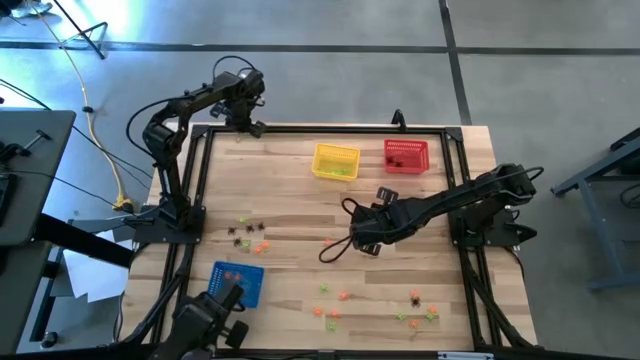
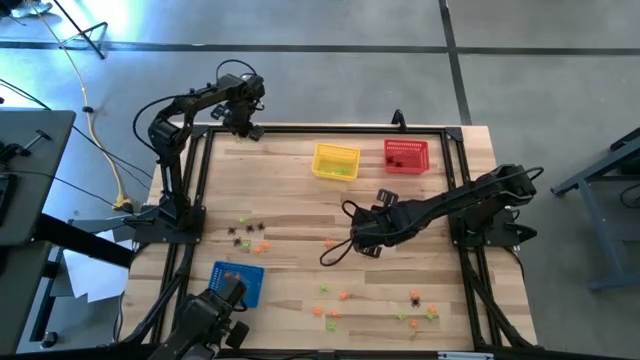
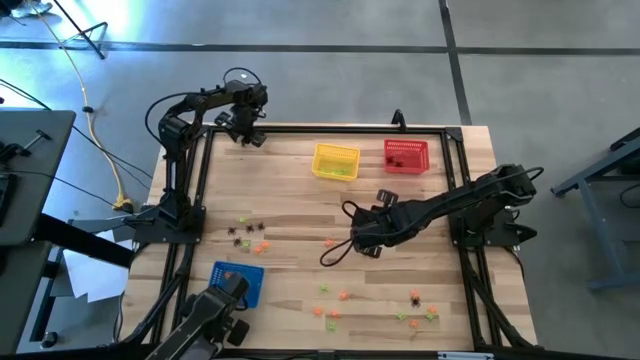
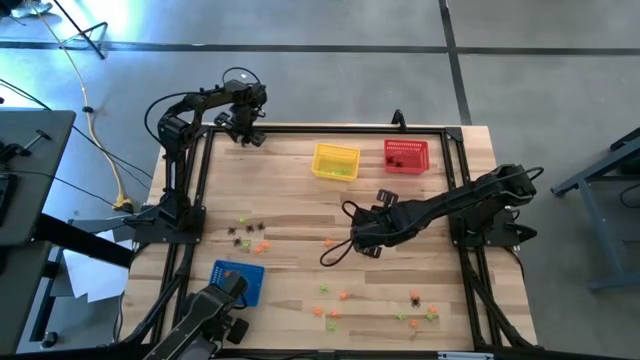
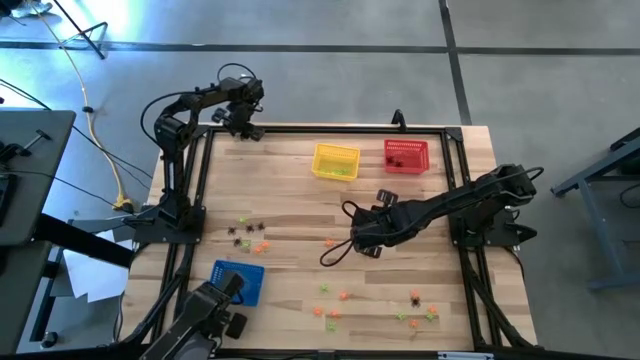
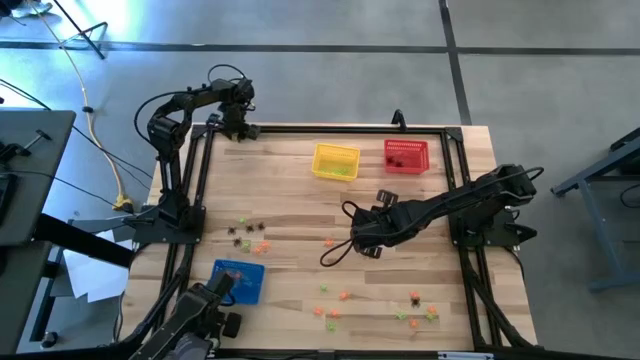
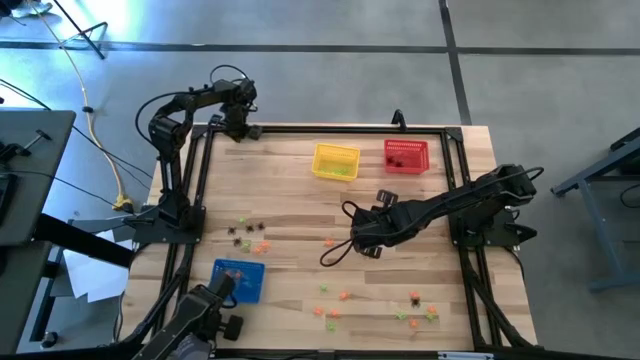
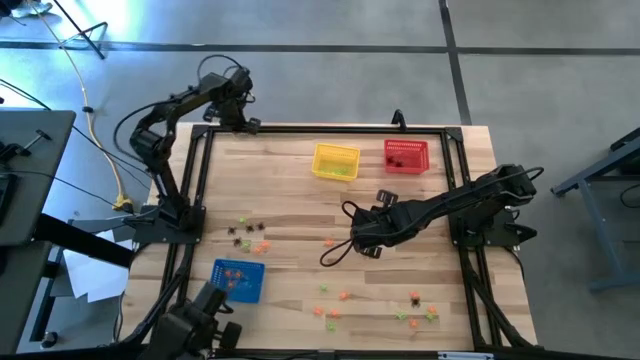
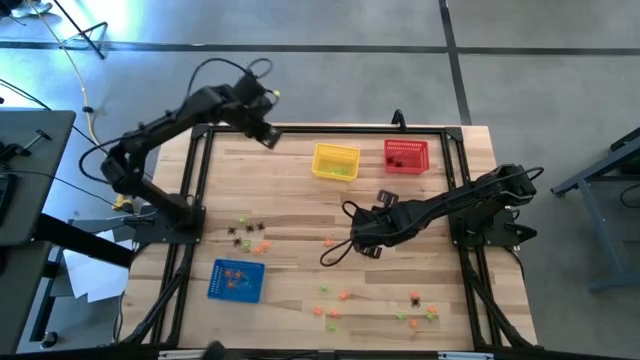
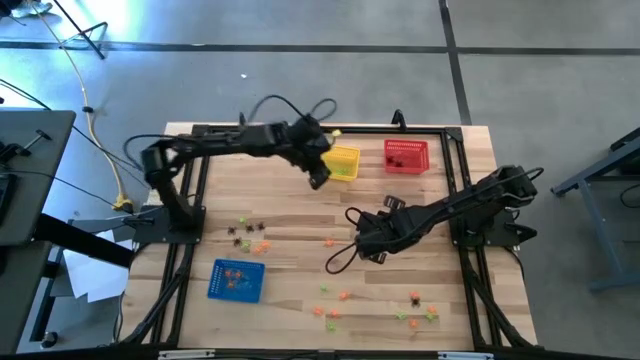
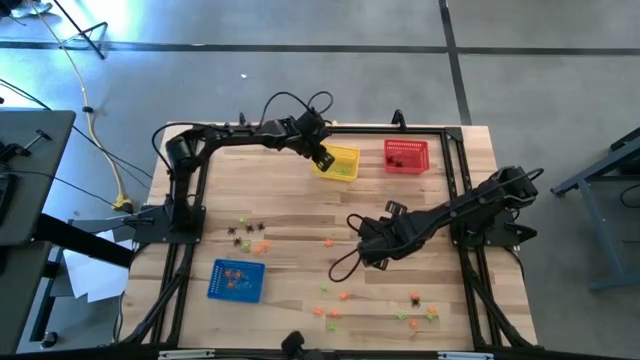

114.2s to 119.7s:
Task: Sort Halloween decoration
Put the green spider toy into the yellow bin

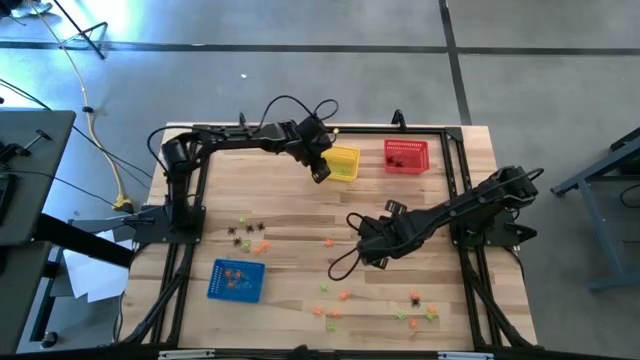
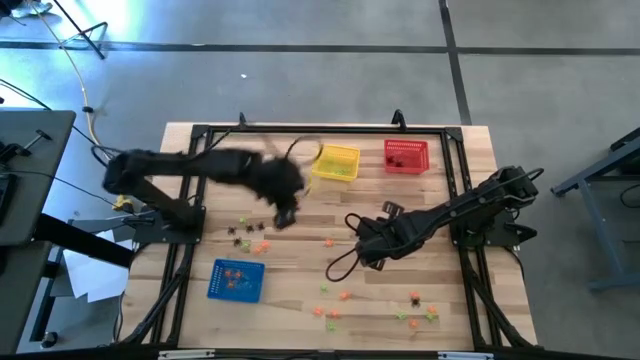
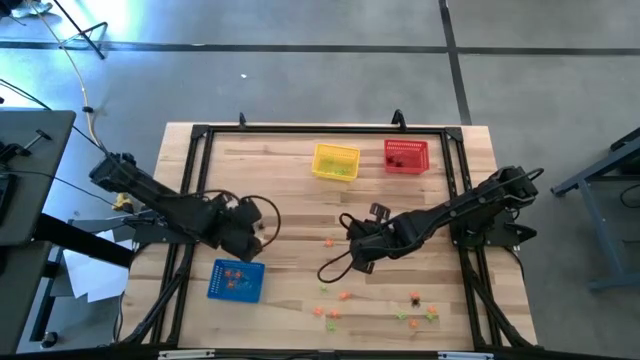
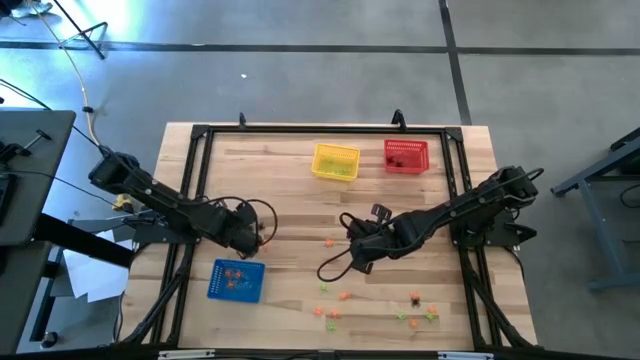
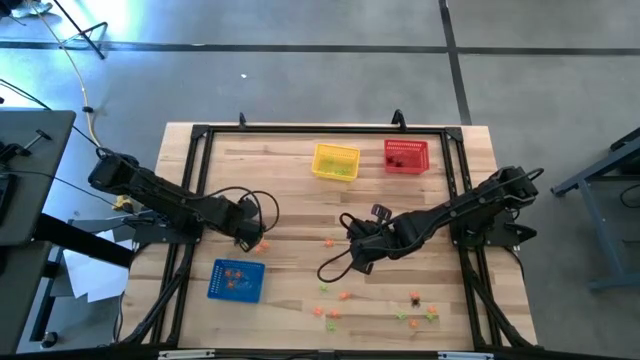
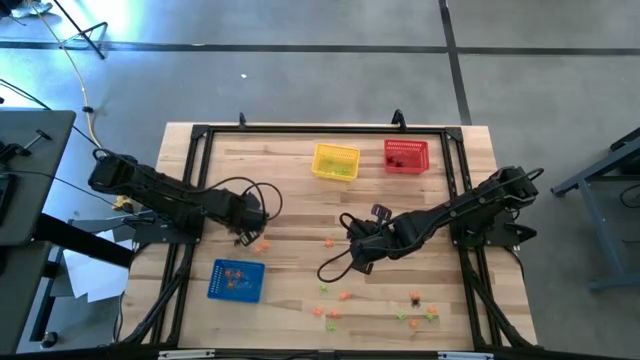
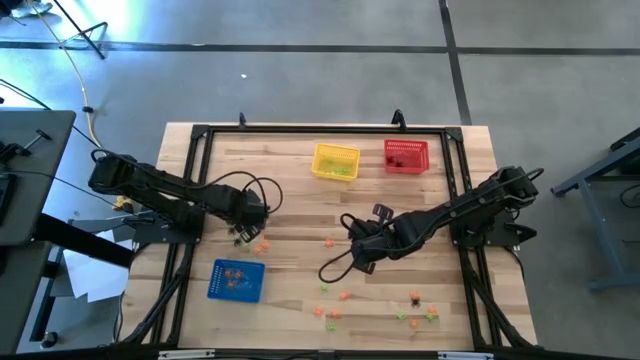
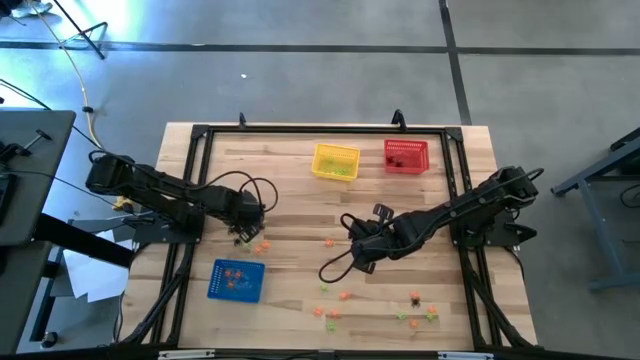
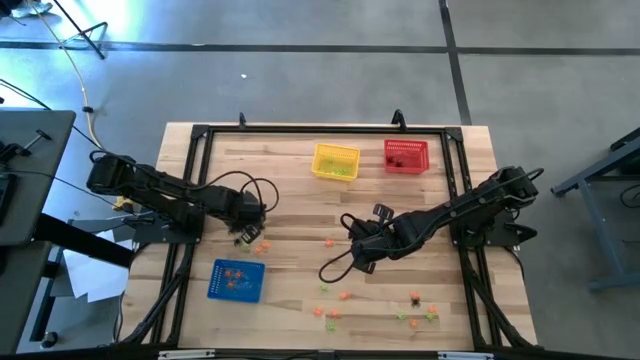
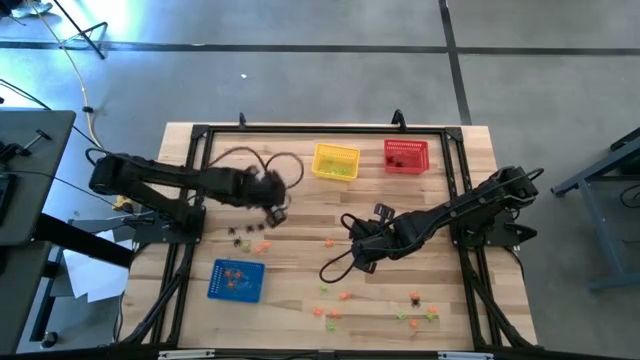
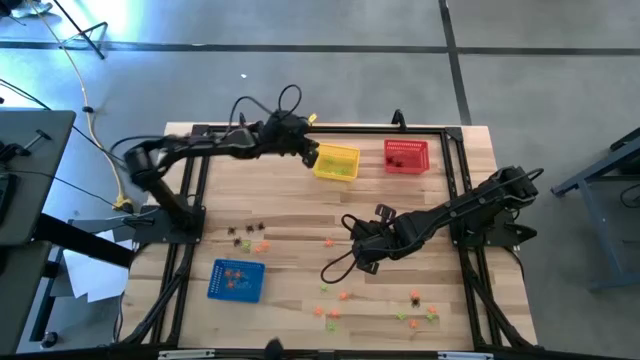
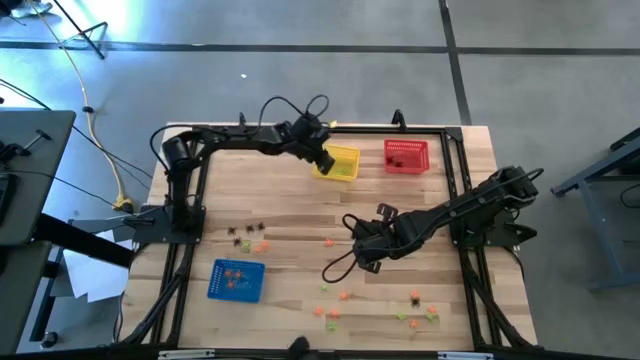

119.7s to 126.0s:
Put the green spider toy into the yellow bin

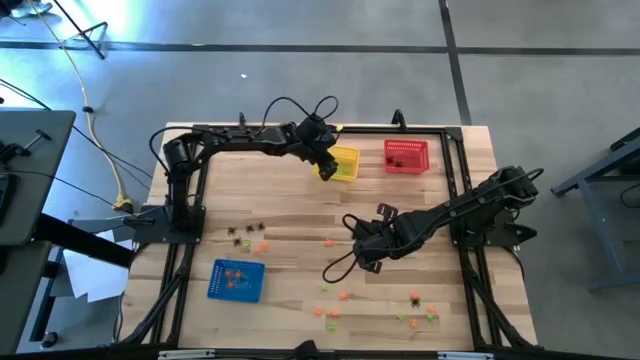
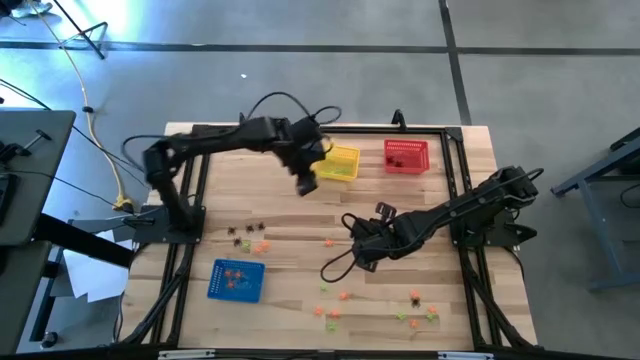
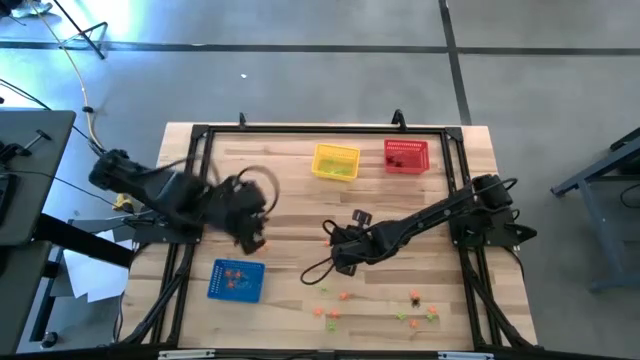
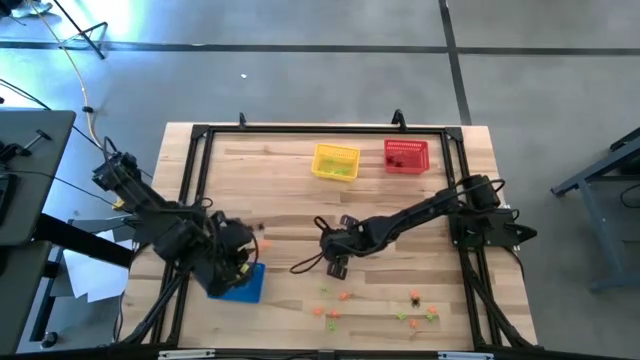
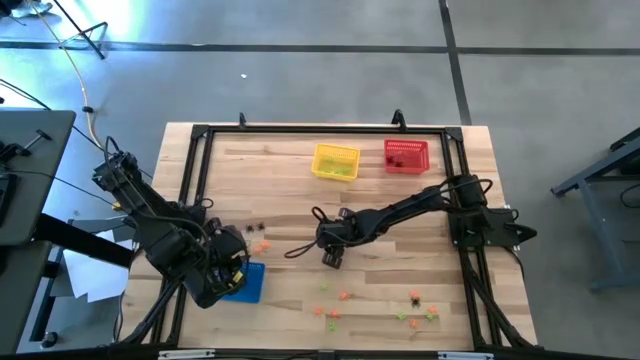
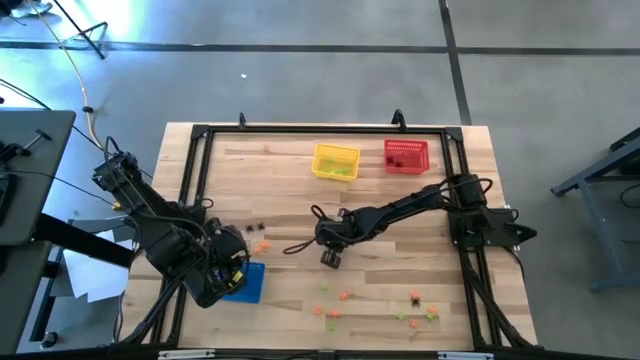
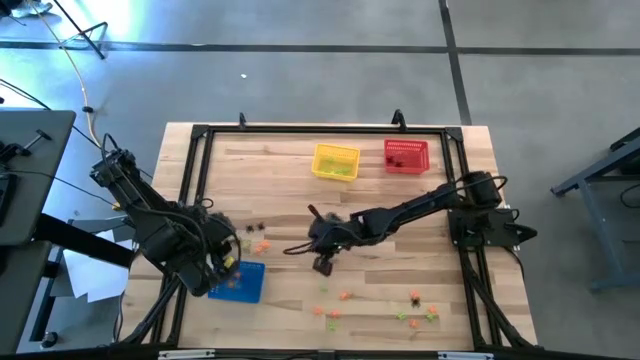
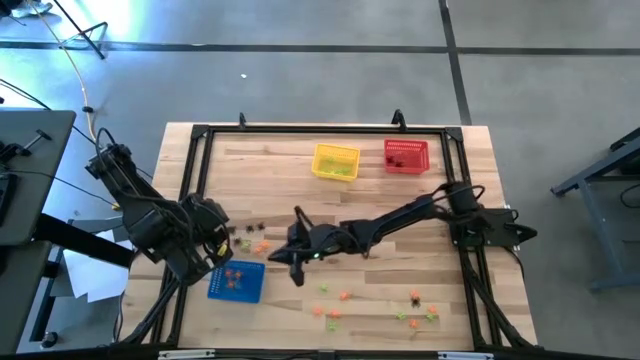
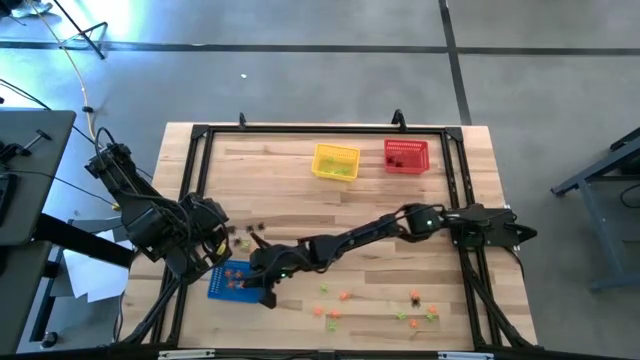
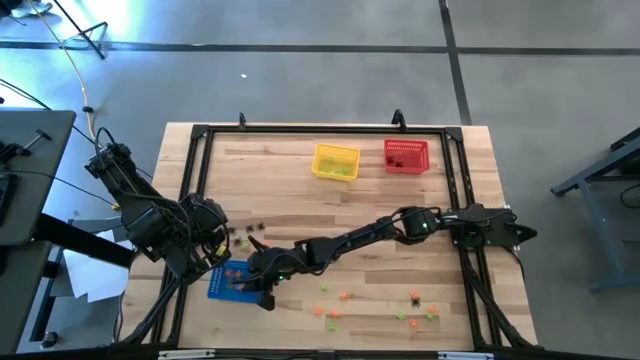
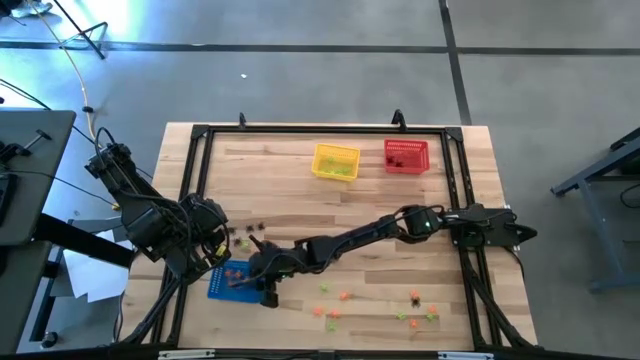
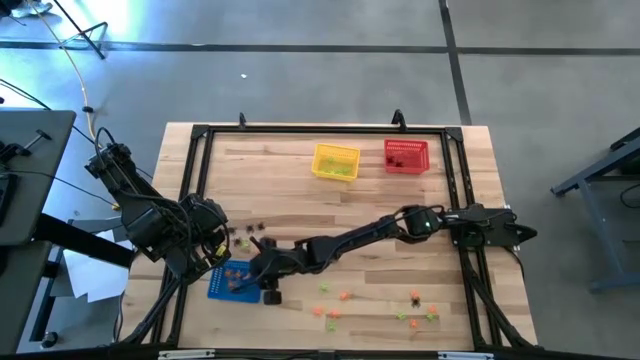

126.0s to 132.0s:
Put the orange spider toy into the blue bin

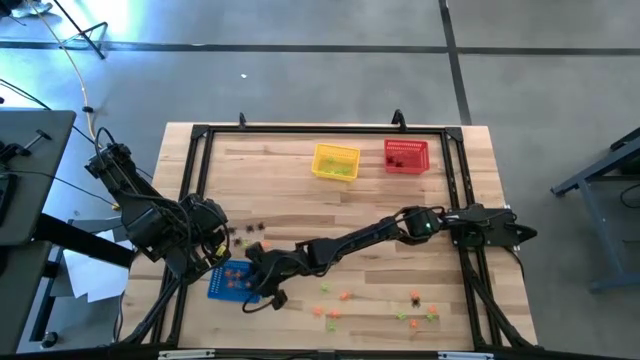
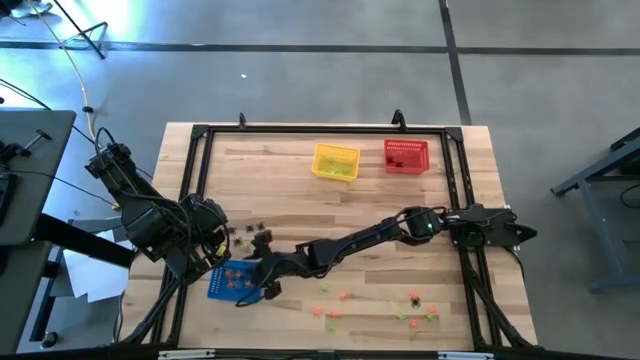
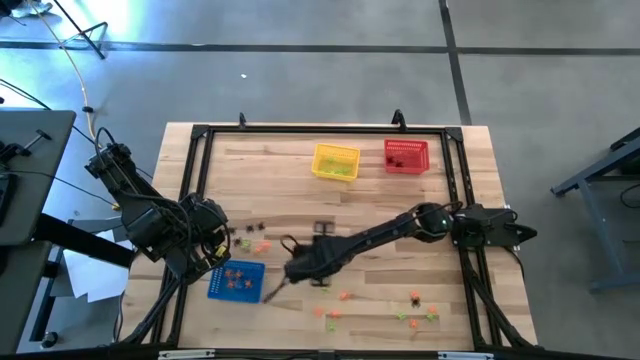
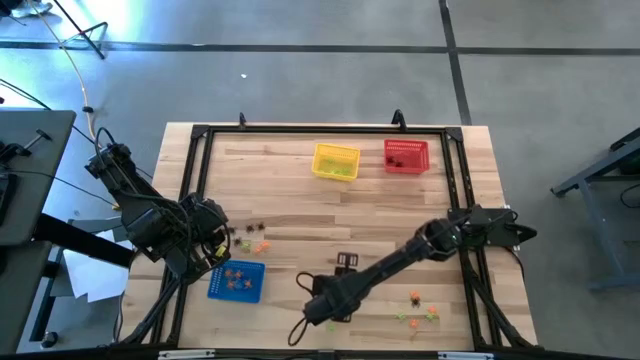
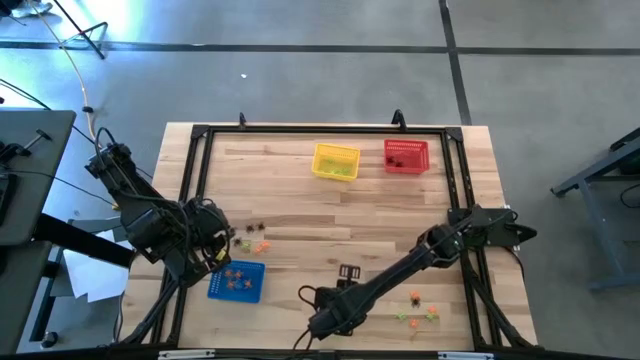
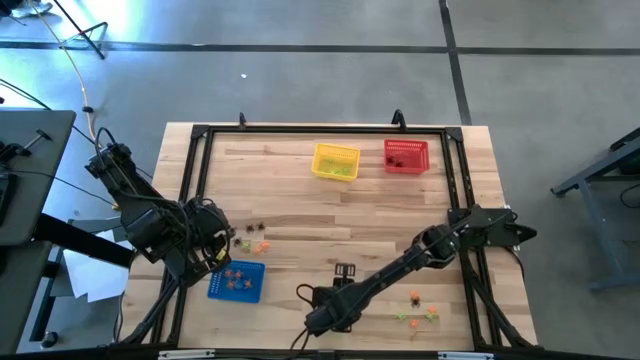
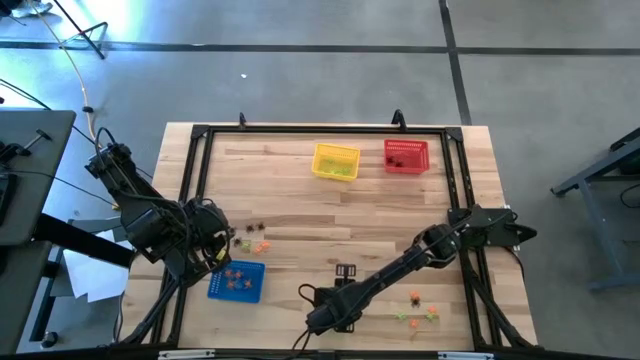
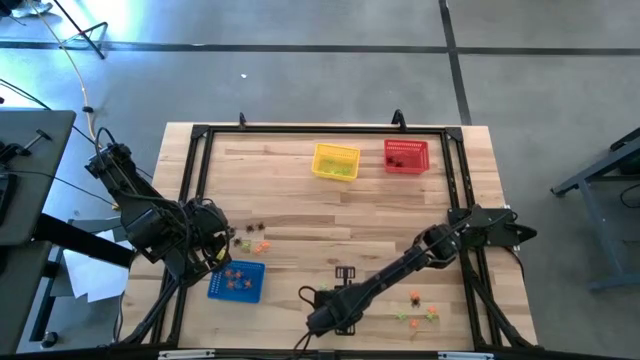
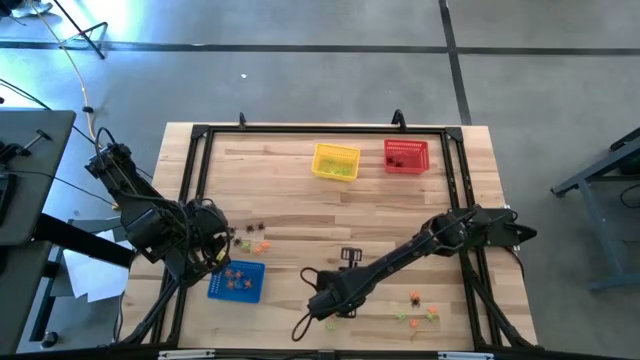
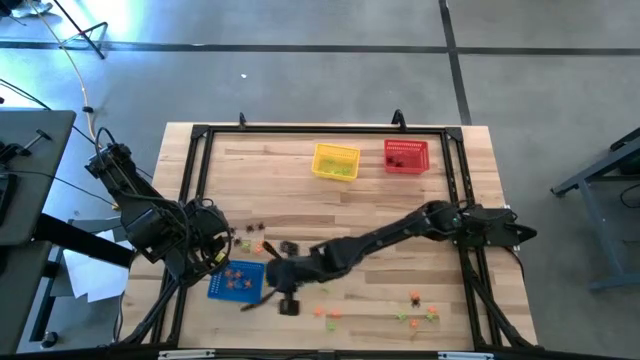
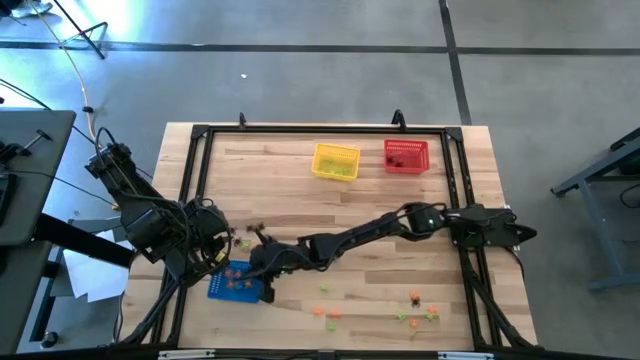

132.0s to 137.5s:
Put the orange spider toy into the blue bin
